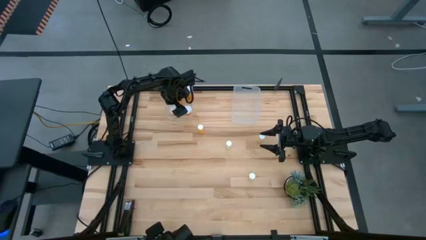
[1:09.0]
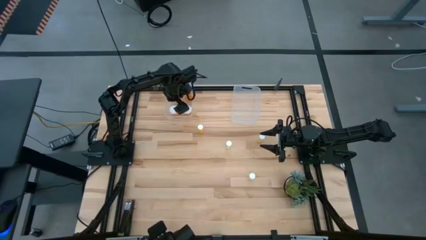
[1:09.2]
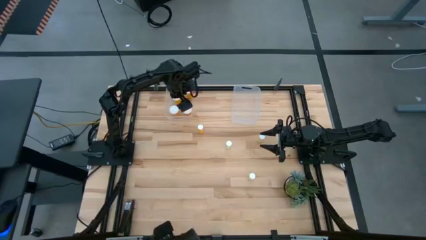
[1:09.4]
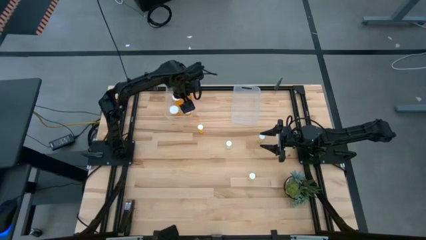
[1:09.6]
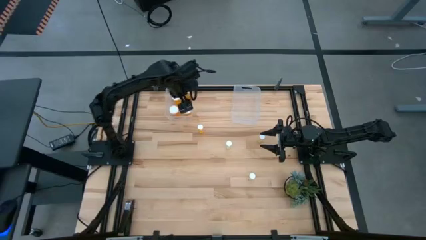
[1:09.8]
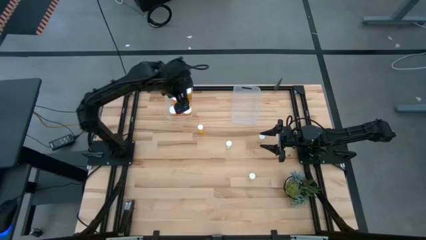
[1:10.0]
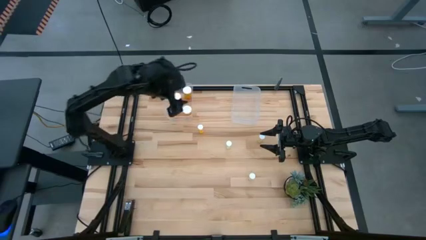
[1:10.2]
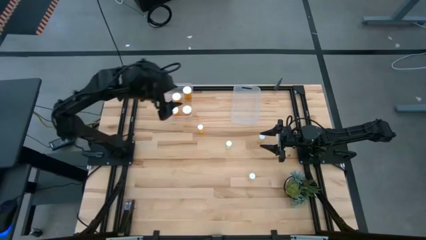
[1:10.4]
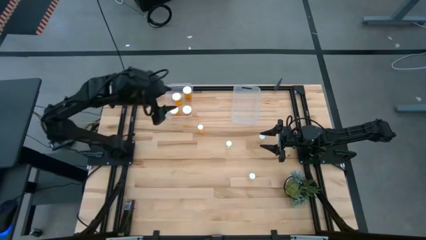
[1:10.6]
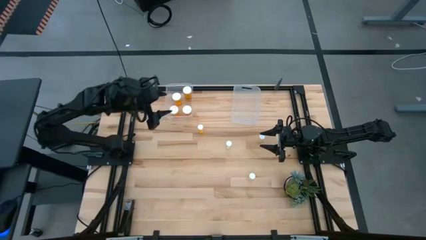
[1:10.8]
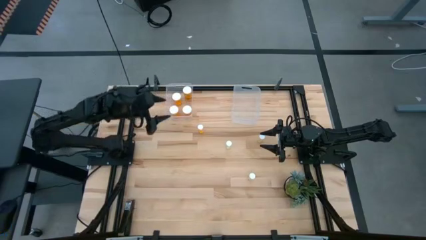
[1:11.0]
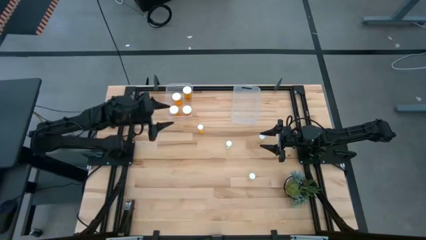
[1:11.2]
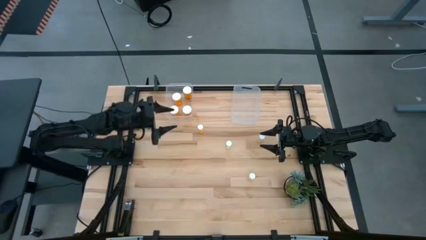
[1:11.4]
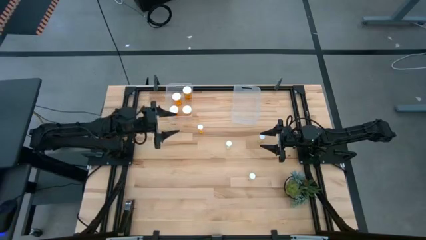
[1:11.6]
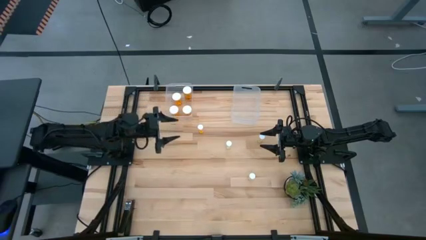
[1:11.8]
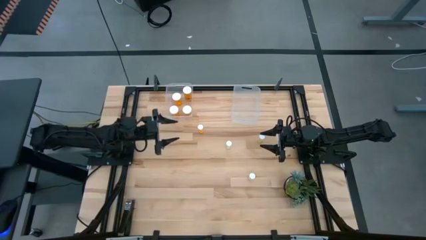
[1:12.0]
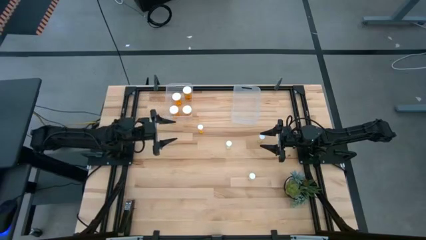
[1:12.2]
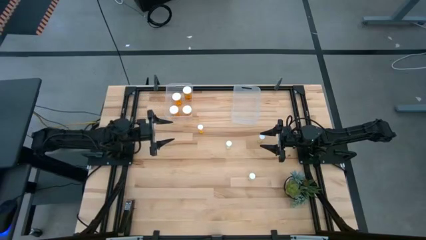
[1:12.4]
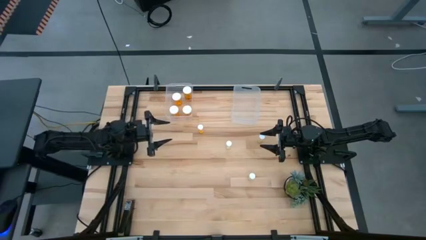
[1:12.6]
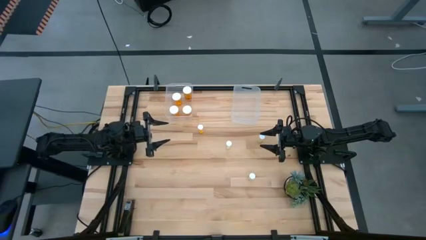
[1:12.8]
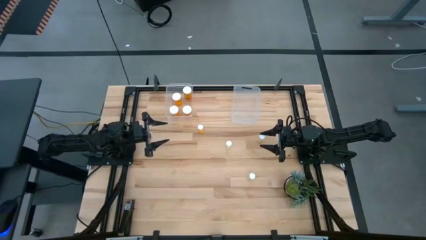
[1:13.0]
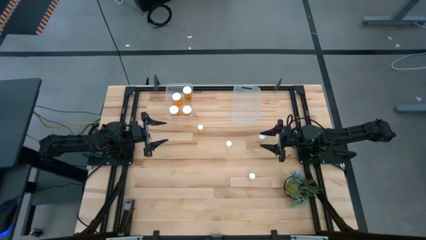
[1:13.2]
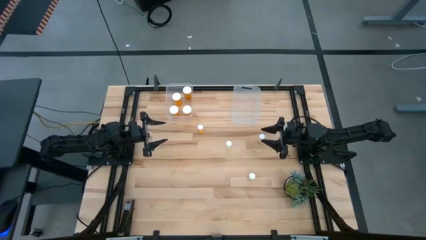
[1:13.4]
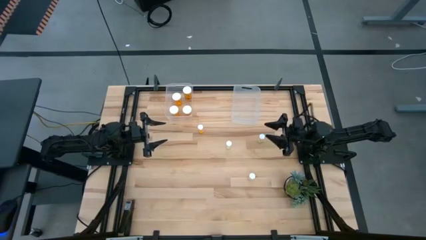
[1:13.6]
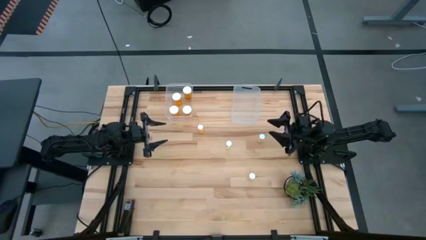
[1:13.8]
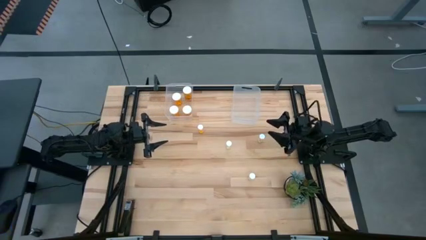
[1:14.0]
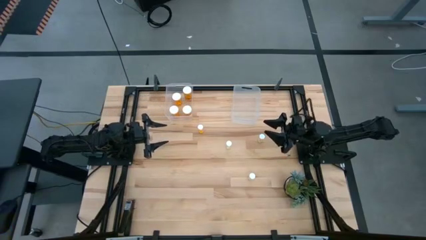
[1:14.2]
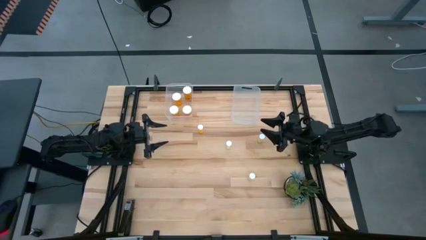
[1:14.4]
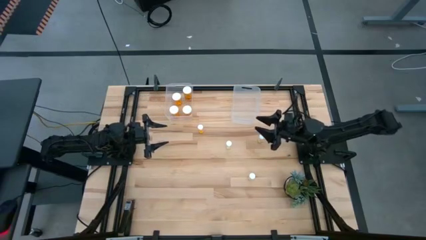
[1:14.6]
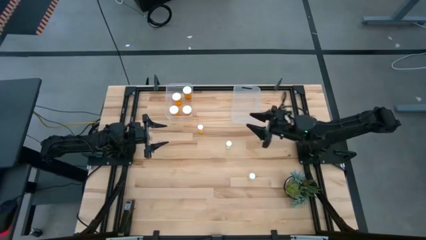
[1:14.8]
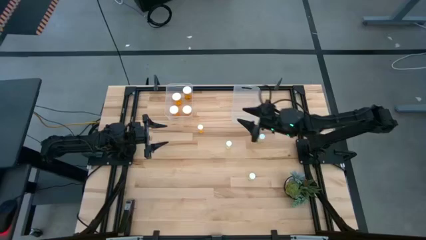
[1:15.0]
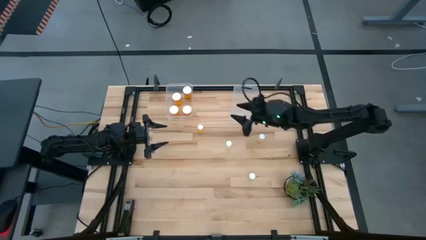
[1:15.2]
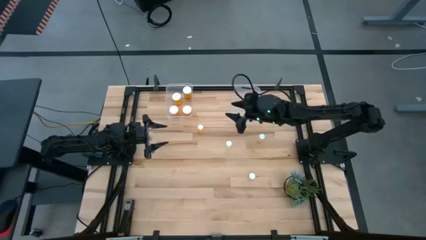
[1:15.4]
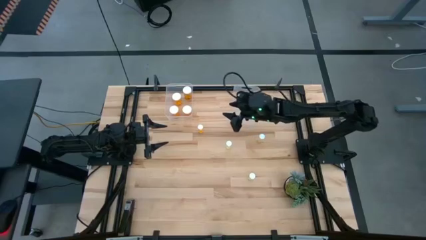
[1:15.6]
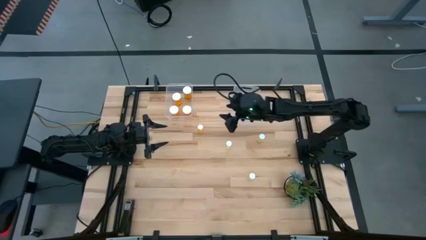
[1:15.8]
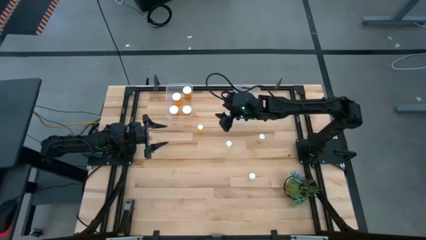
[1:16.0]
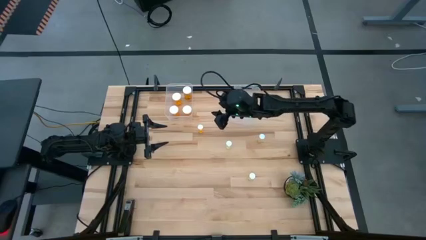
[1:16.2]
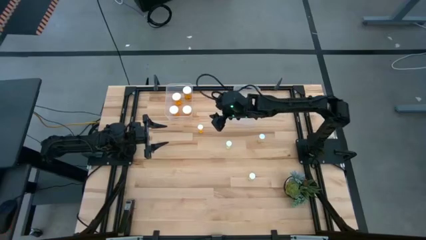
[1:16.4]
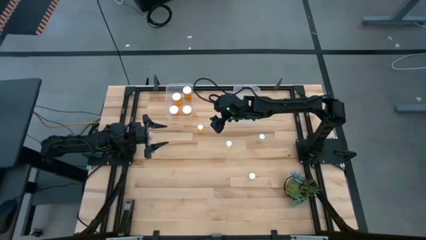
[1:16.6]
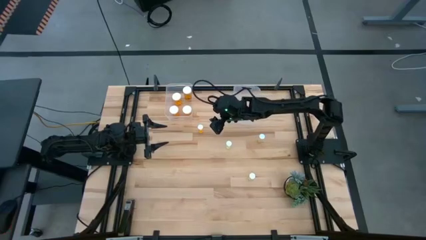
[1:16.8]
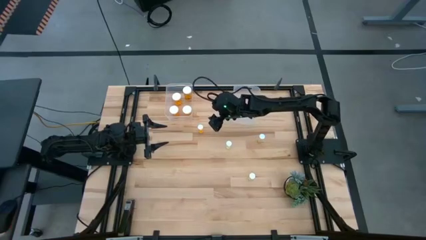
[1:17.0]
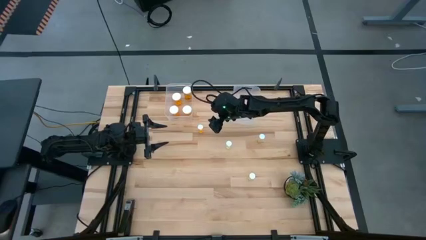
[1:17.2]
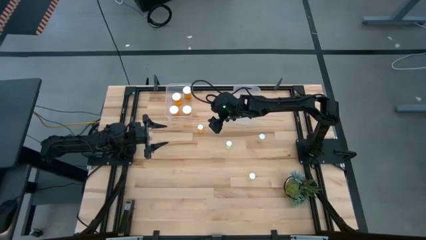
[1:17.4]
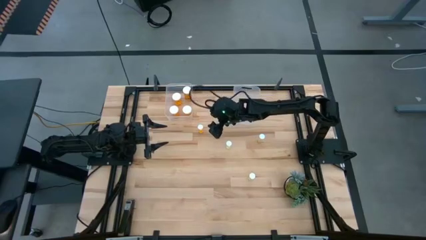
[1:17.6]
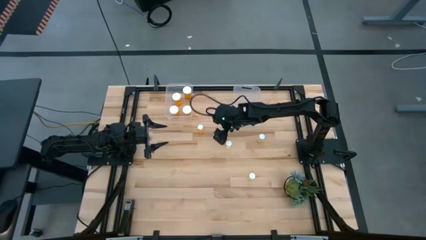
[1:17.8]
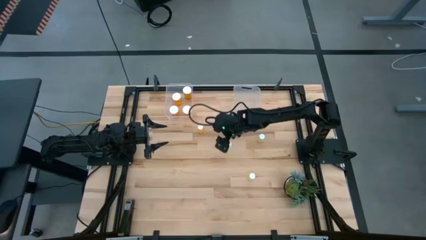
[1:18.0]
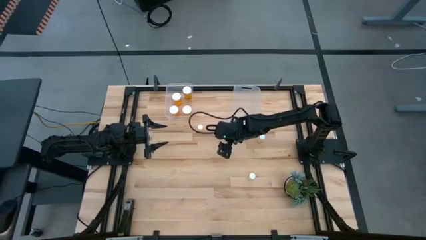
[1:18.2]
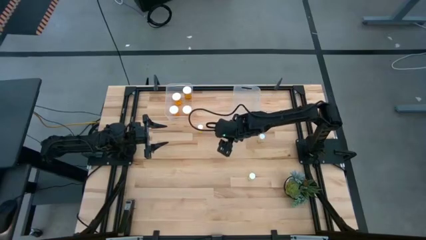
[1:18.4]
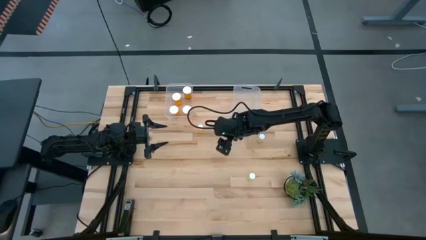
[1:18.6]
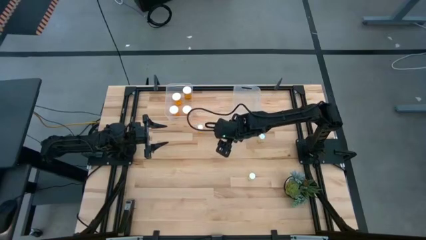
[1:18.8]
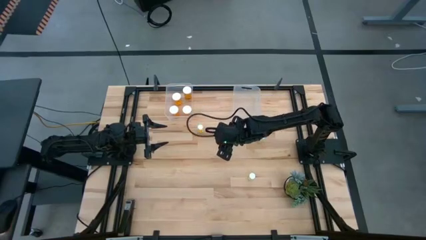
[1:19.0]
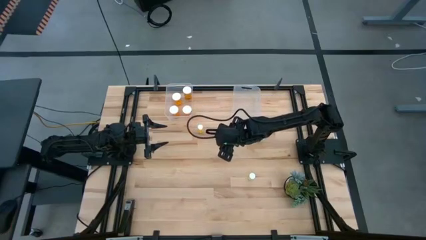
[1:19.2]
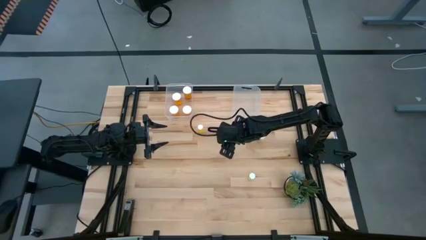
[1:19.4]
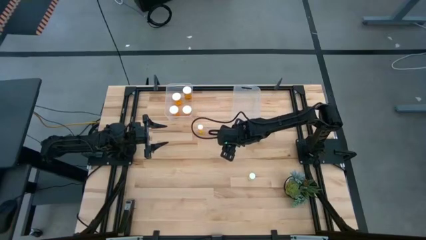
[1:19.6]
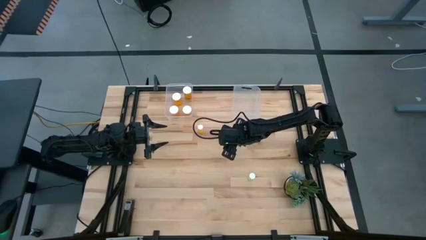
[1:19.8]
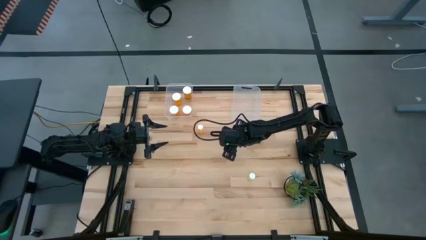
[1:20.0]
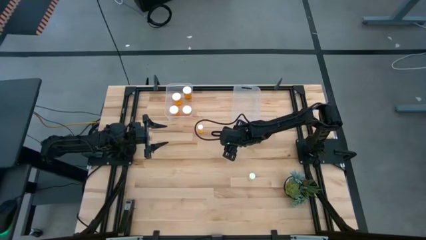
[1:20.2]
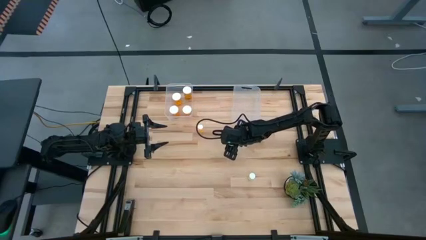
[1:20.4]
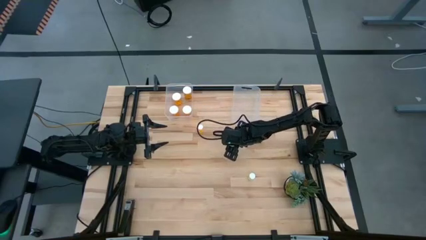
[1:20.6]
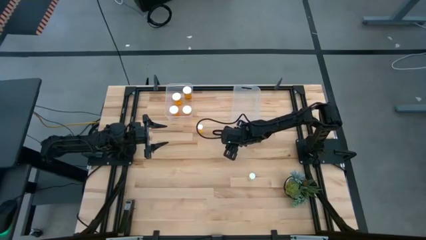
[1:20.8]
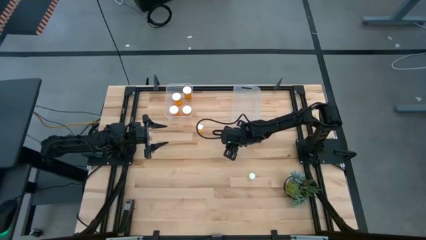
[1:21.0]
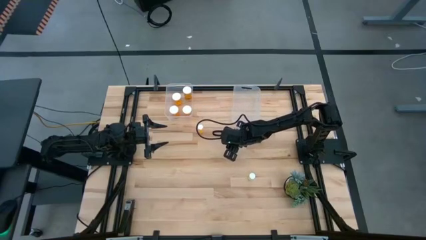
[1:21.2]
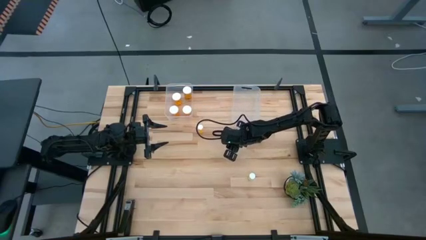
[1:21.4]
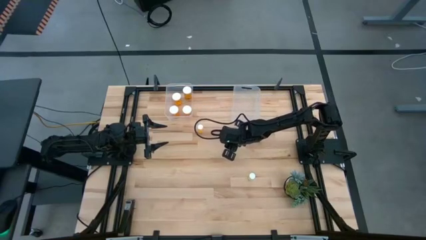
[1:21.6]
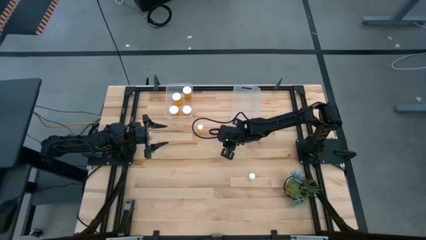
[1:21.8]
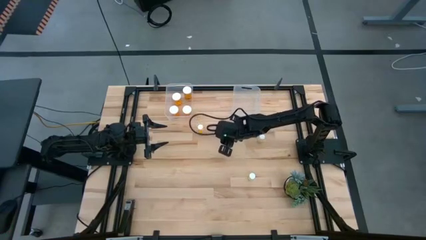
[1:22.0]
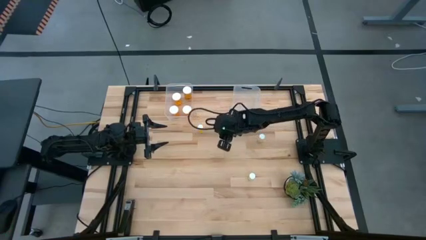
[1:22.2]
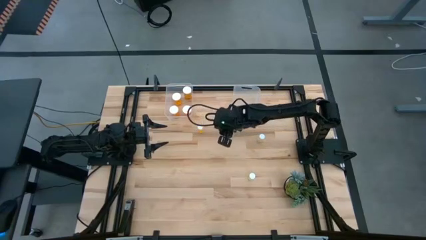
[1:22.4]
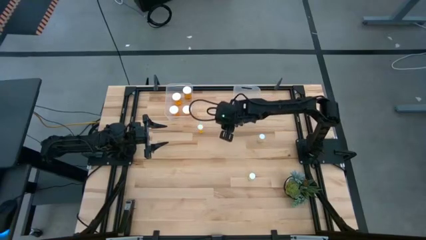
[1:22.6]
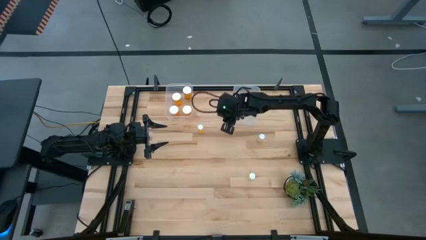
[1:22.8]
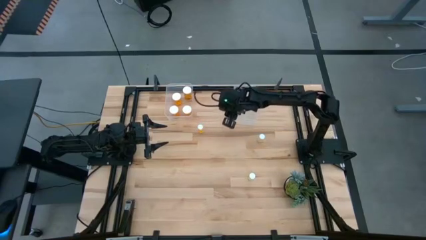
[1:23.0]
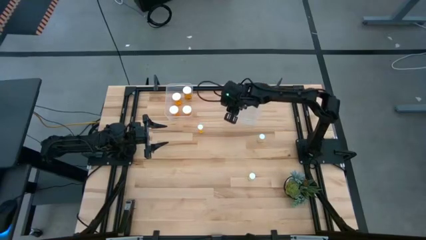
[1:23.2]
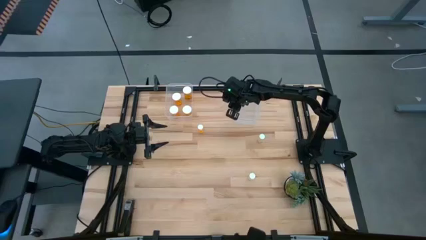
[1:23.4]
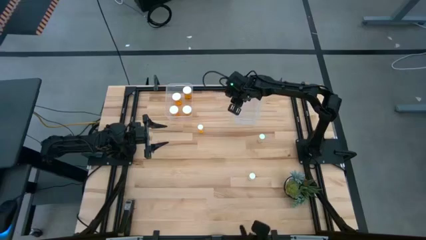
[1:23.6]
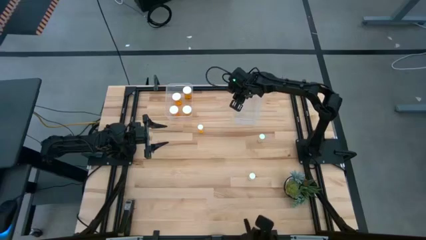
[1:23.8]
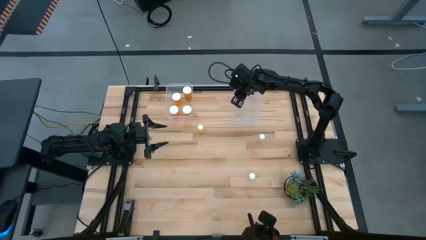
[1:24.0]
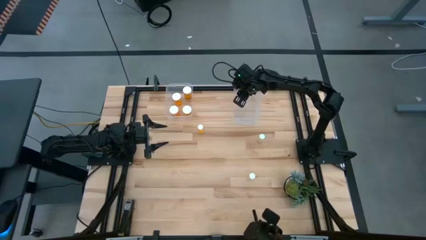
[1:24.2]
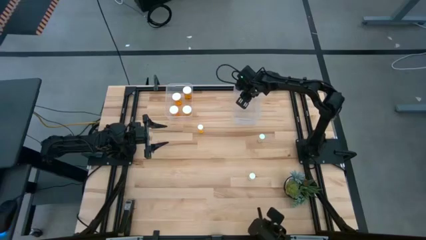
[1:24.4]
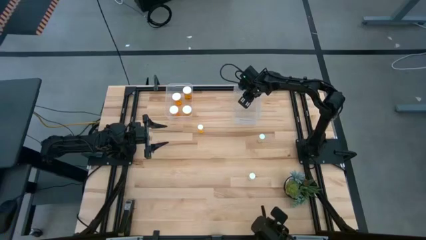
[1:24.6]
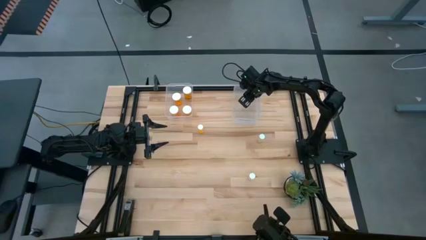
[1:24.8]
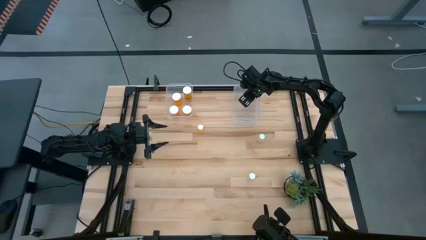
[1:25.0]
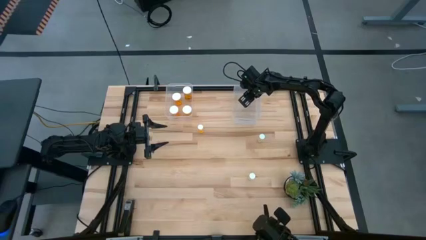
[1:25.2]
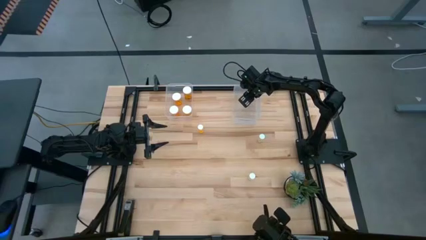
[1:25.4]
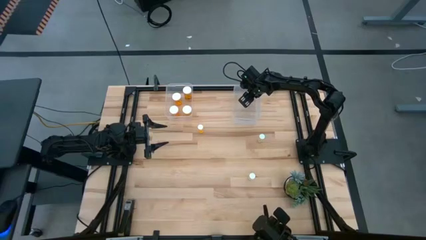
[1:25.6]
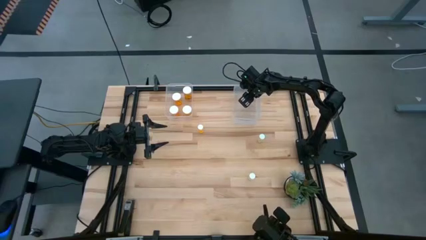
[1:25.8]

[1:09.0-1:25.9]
Task: Pick and place medicine bottles into bin by pill shape (circle, oval)
Put the small yellow pill bottle into the right transparent bin
